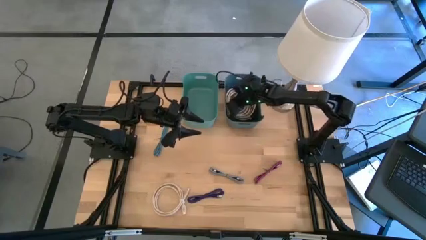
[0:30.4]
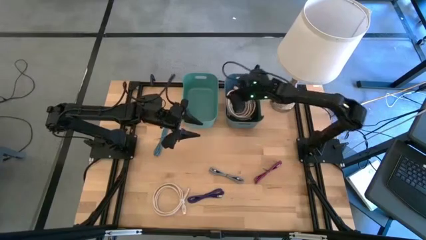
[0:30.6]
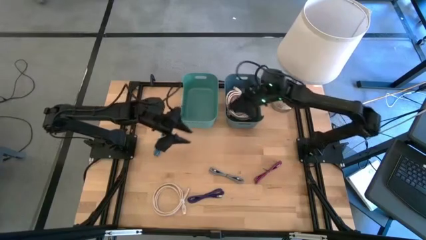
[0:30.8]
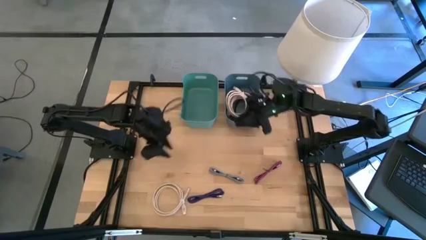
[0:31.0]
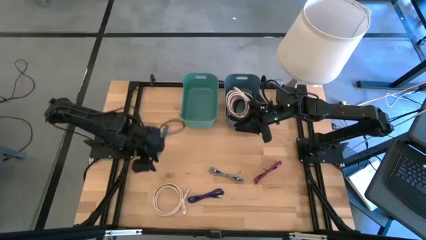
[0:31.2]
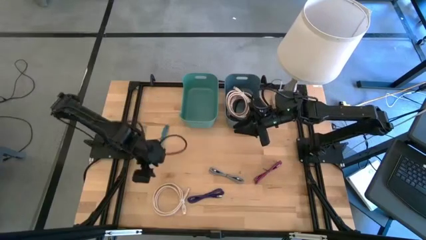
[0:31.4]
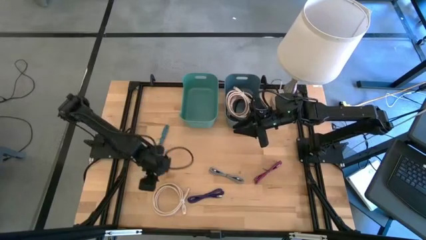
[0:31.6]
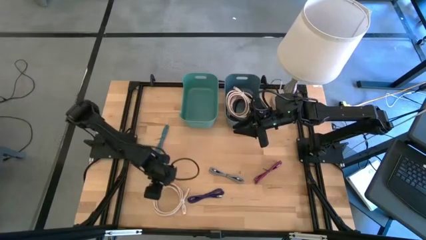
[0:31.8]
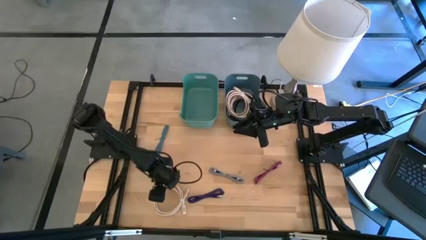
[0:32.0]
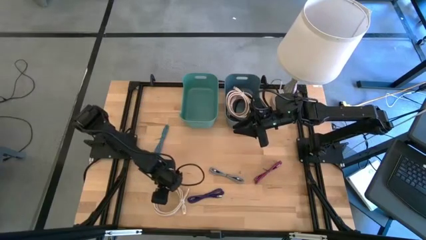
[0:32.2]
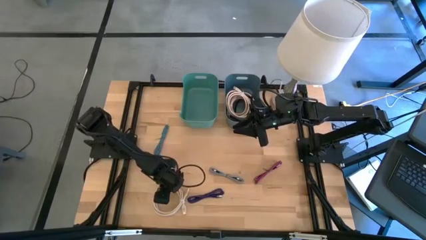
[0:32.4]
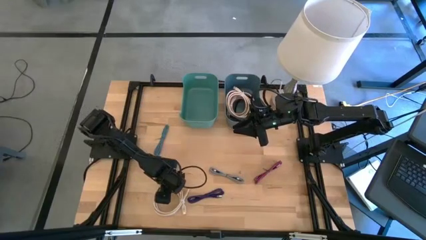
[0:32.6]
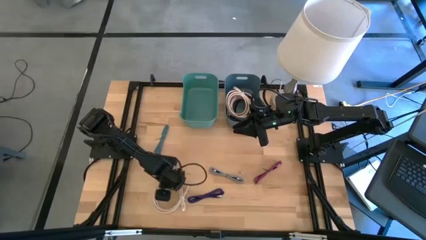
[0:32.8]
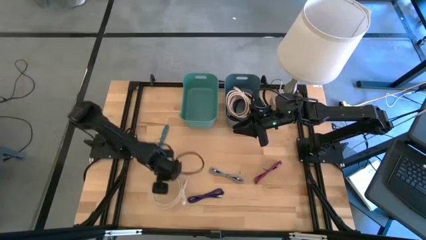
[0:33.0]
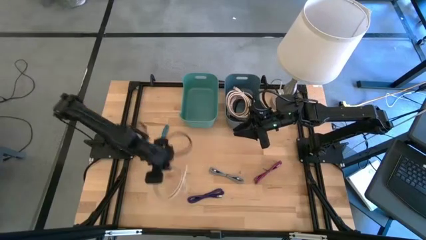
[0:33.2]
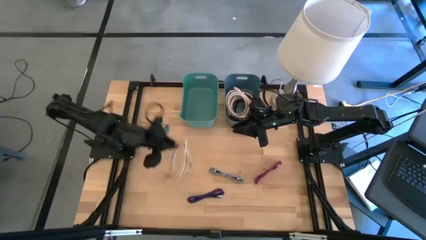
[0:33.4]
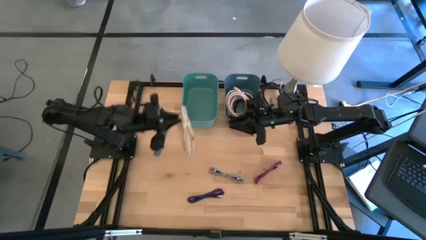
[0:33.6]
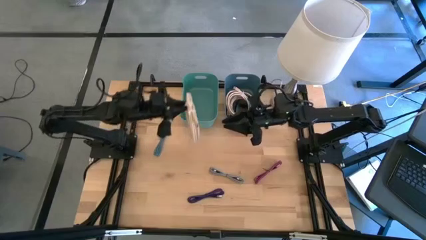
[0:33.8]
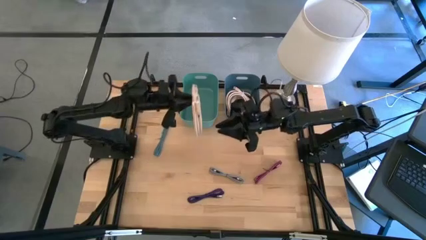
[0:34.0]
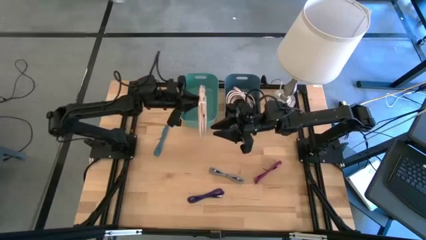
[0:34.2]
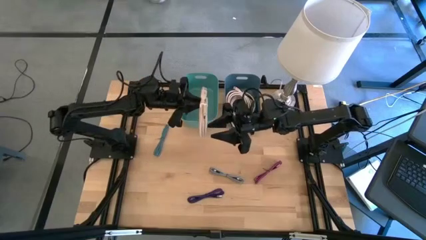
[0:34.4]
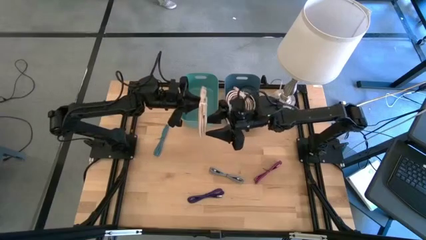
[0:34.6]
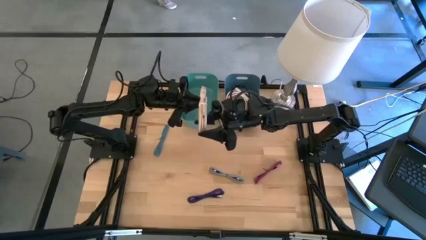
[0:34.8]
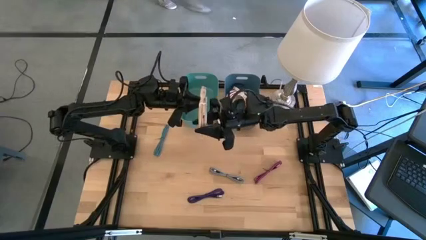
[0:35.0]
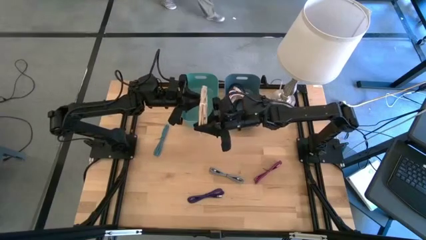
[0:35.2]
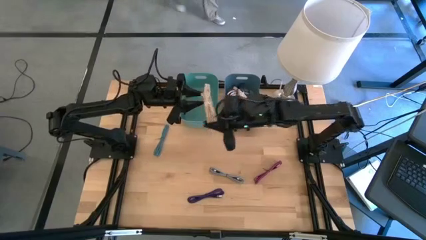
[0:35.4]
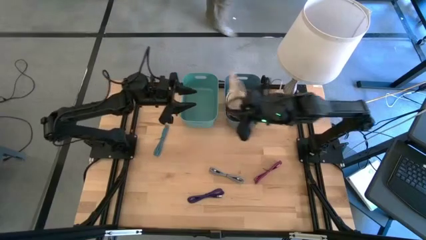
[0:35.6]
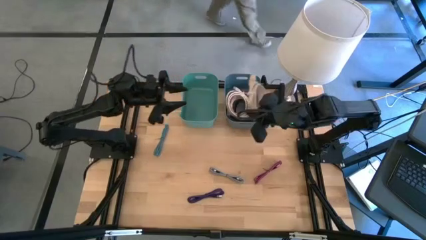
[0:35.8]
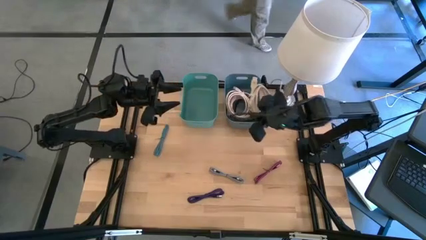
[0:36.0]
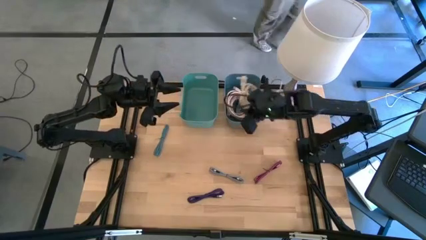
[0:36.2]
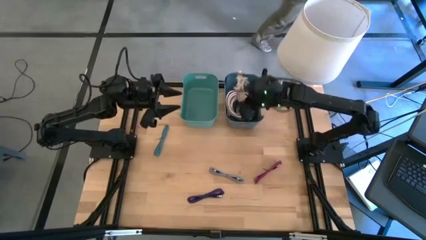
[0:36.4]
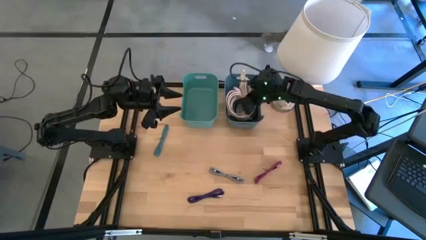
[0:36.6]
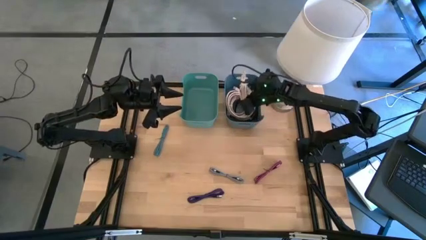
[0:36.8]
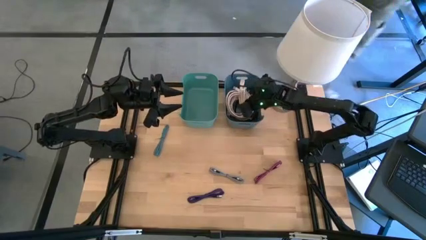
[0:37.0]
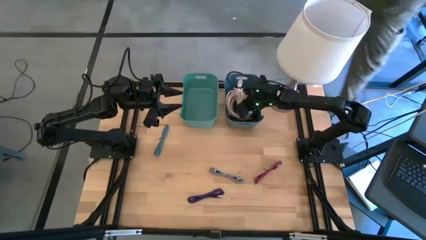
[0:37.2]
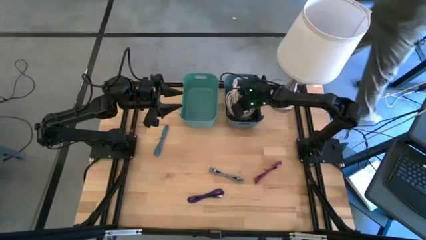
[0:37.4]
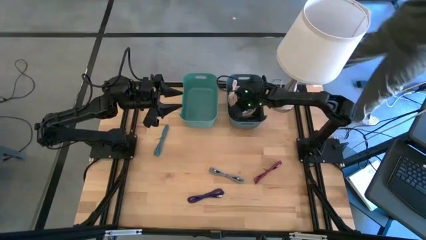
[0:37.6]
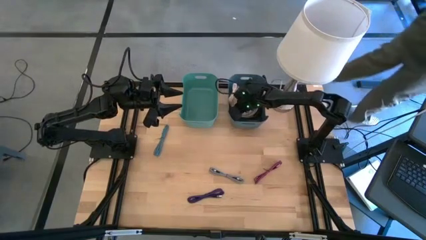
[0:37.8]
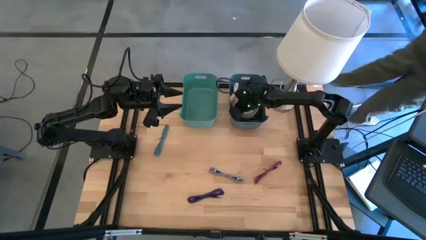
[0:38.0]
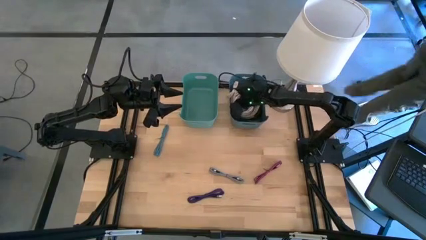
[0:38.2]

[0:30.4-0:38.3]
Put the white HDMI into the blue bin

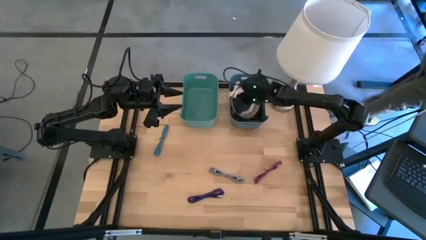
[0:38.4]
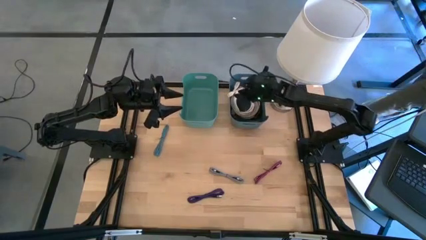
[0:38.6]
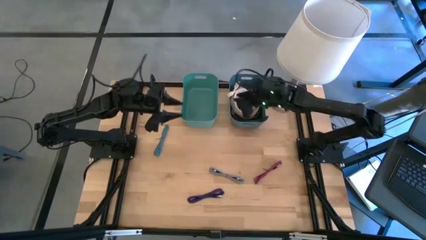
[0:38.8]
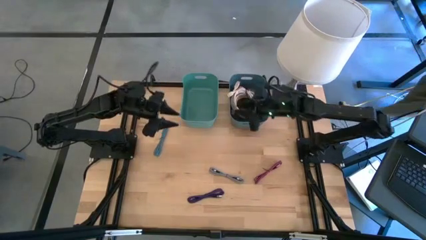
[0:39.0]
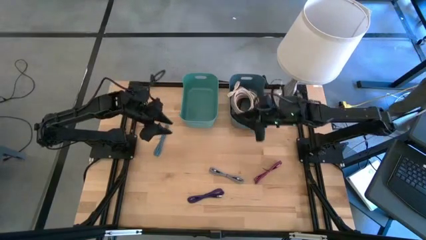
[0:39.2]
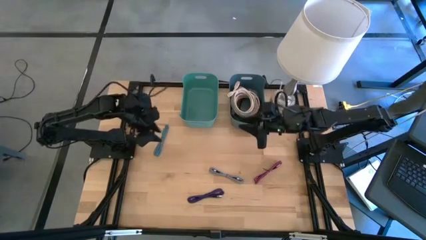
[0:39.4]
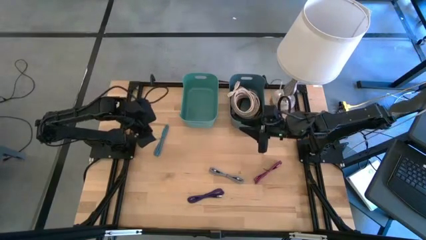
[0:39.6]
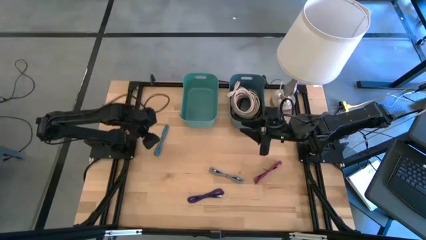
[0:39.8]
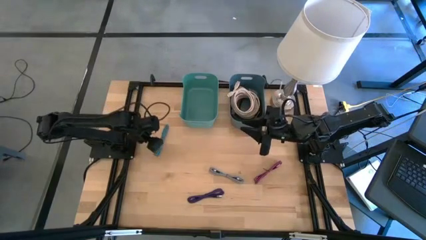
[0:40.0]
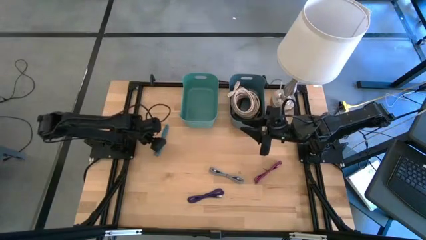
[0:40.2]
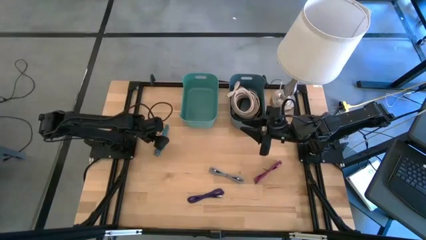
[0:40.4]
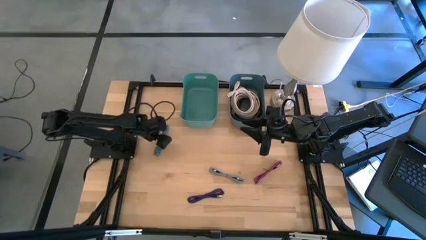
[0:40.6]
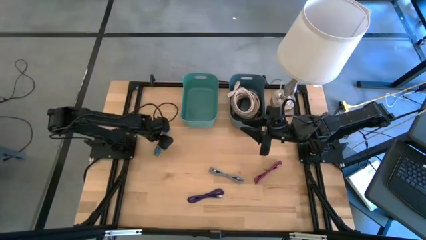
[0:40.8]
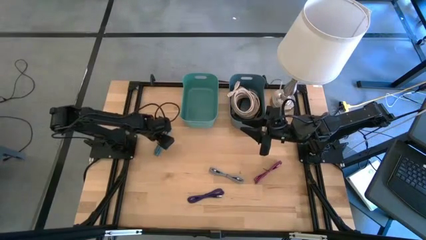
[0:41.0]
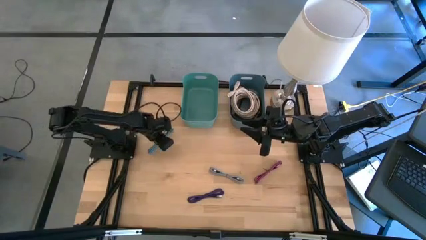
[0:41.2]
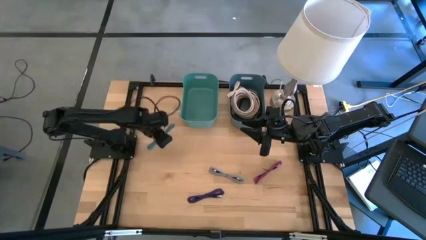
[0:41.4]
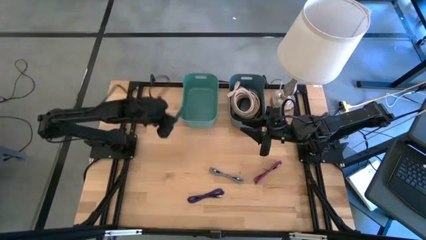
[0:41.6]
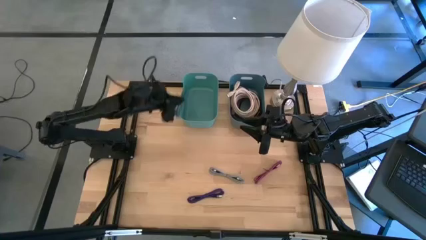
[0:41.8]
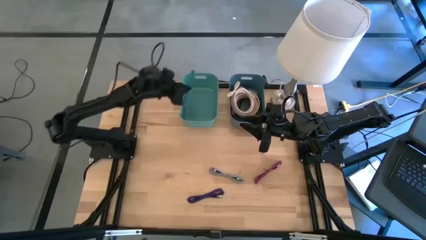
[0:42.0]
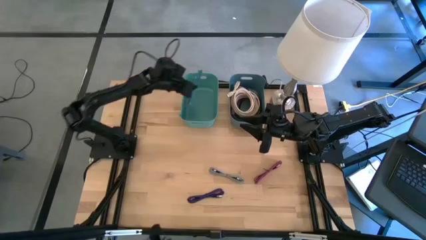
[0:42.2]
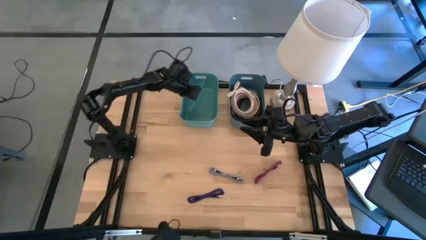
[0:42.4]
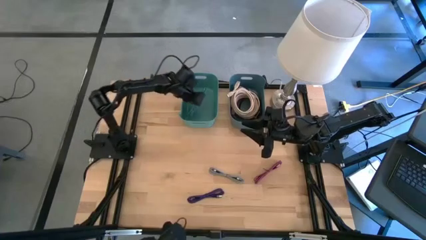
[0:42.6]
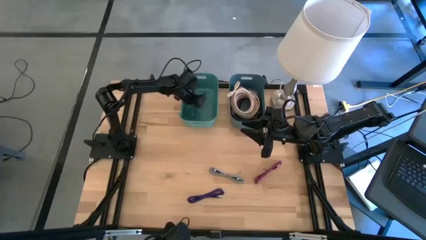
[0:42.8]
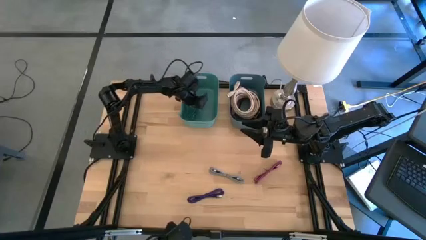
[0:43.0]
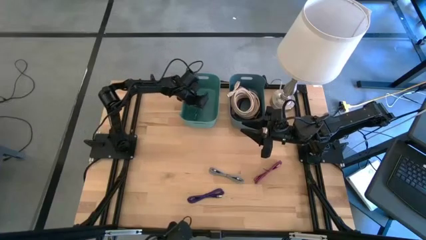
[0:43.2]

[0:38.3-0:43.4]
Put the blue USB cable into the green bin
